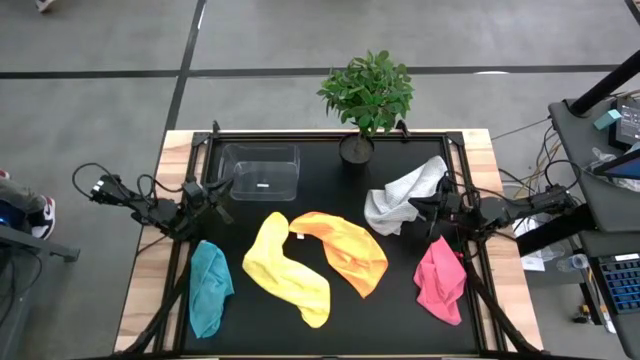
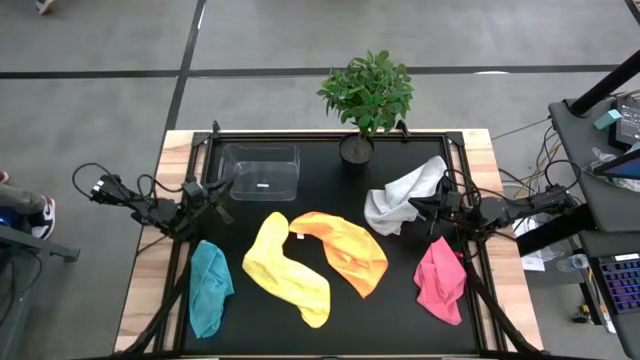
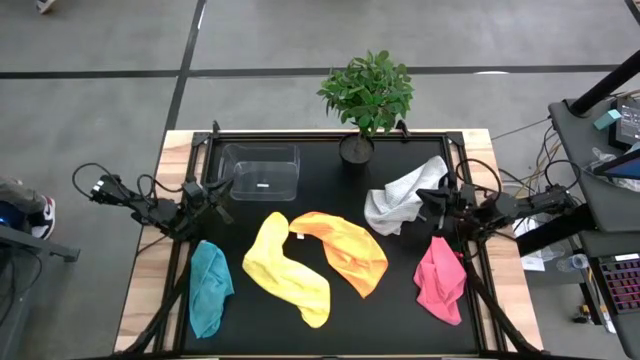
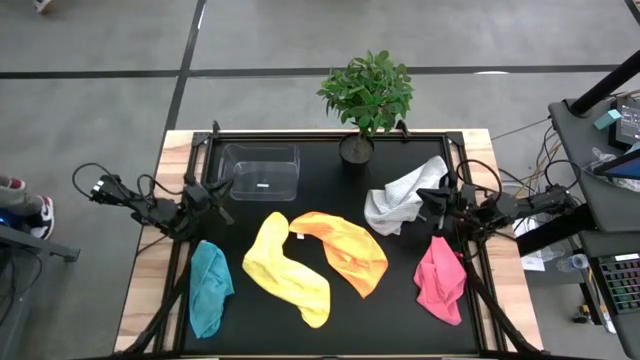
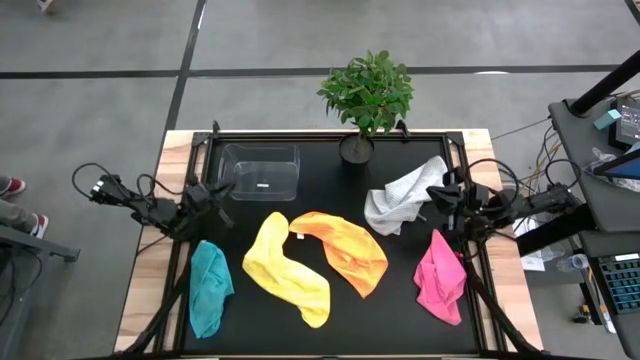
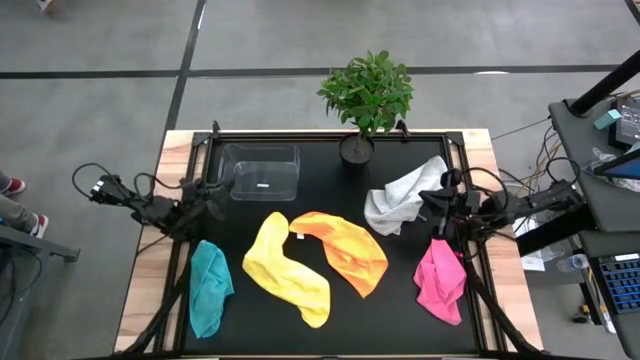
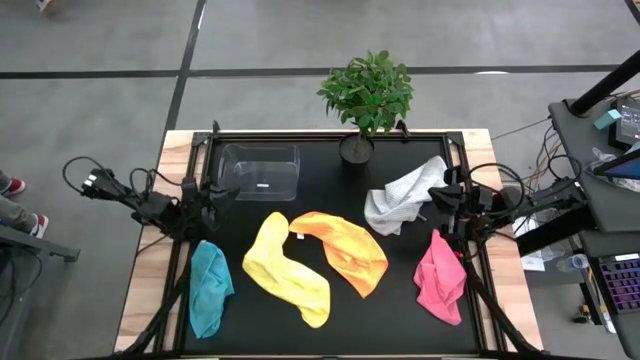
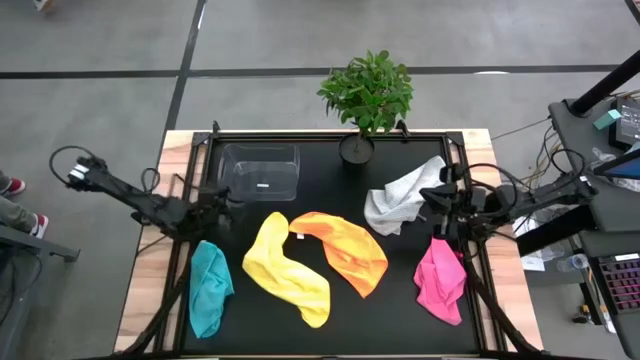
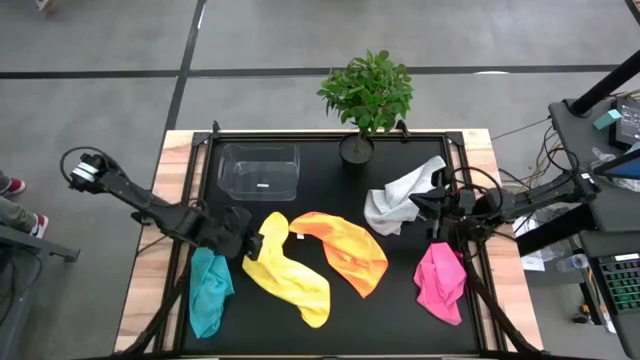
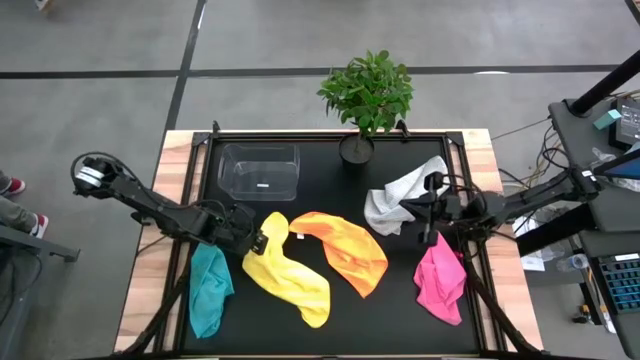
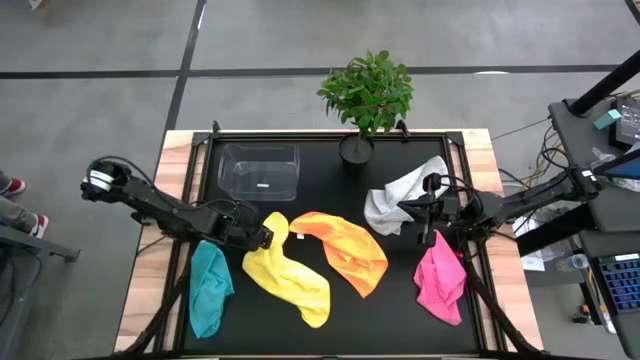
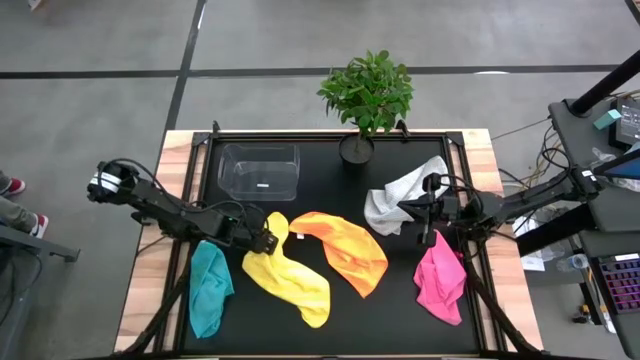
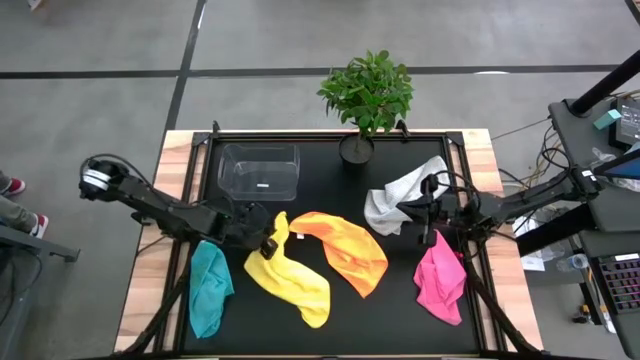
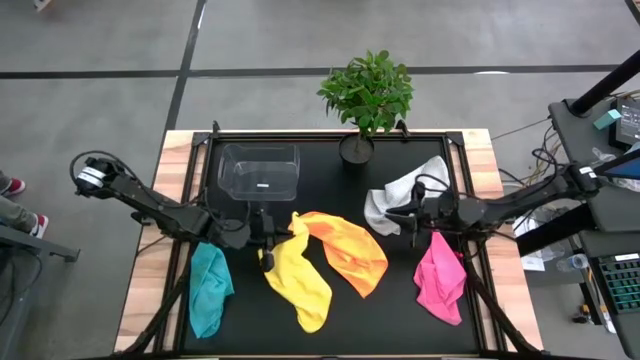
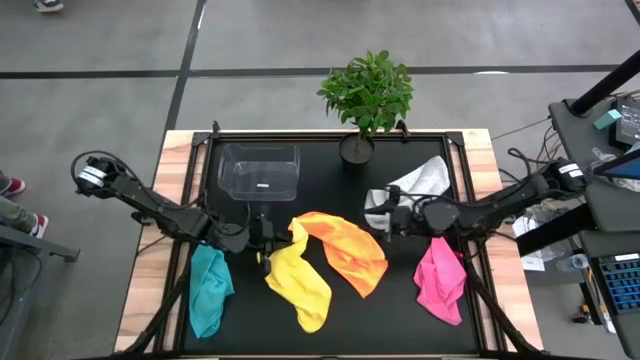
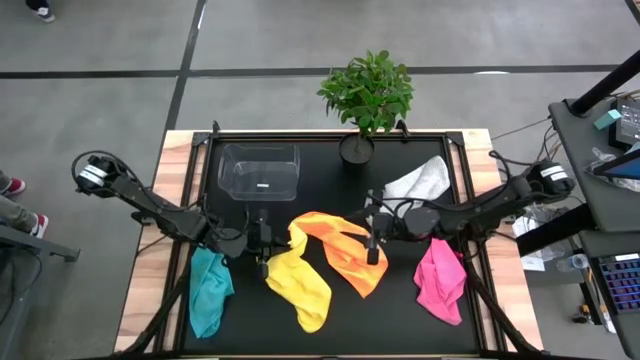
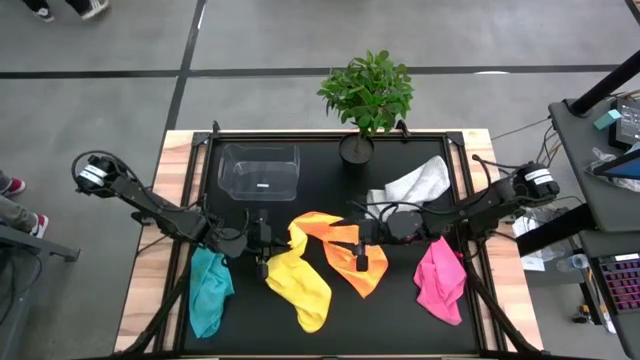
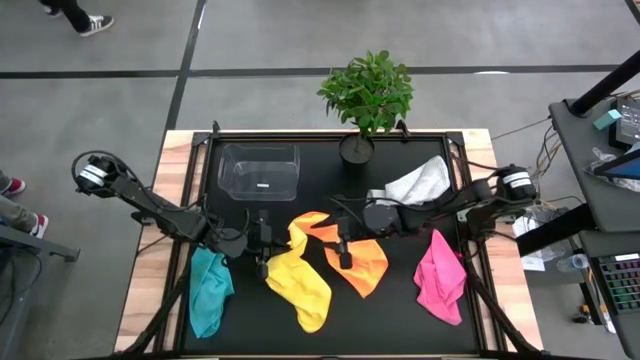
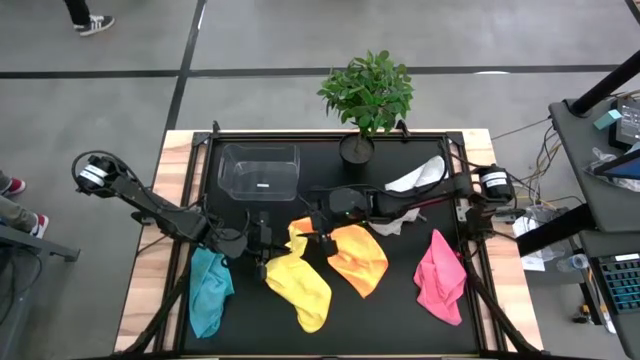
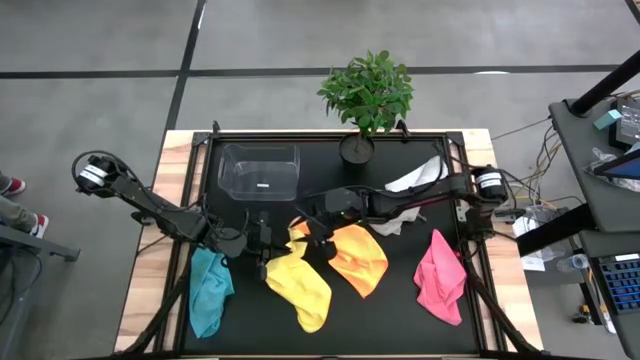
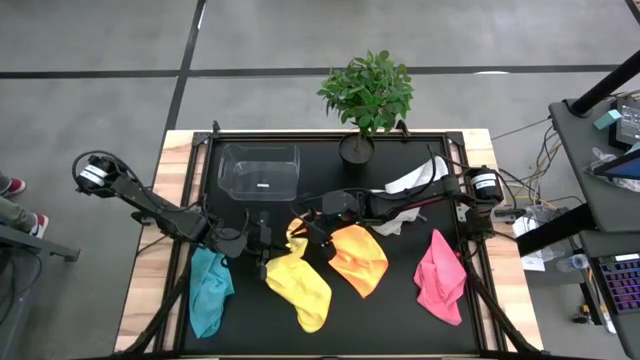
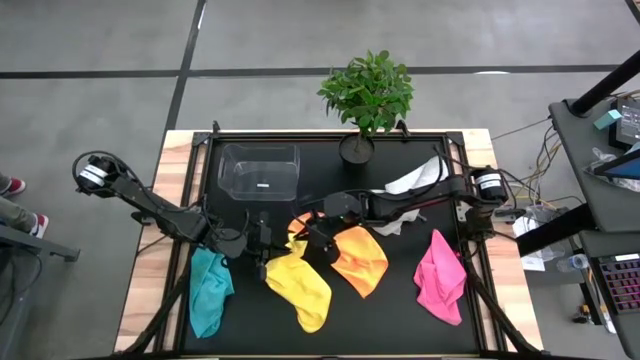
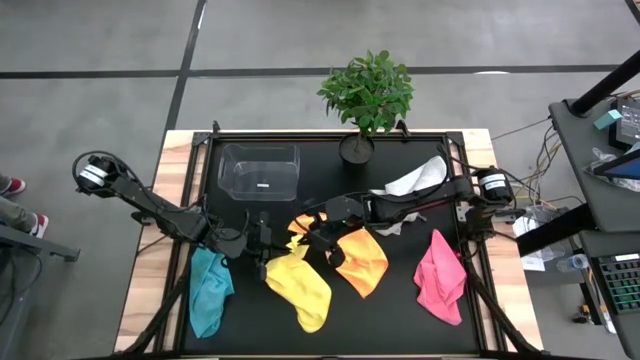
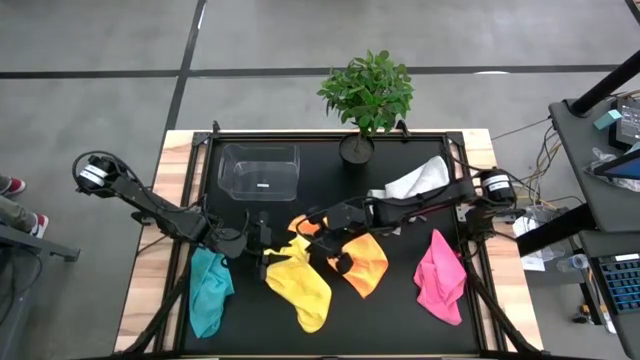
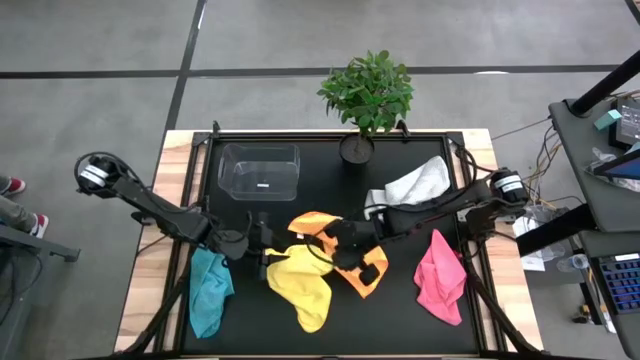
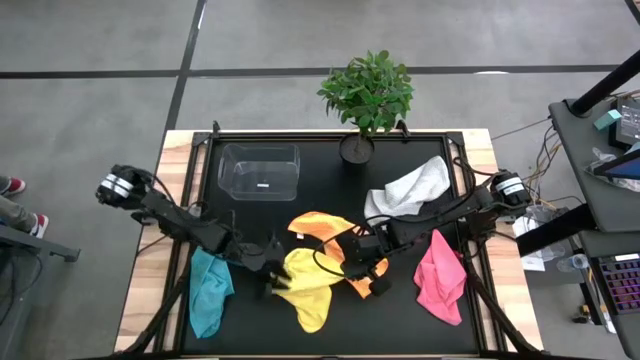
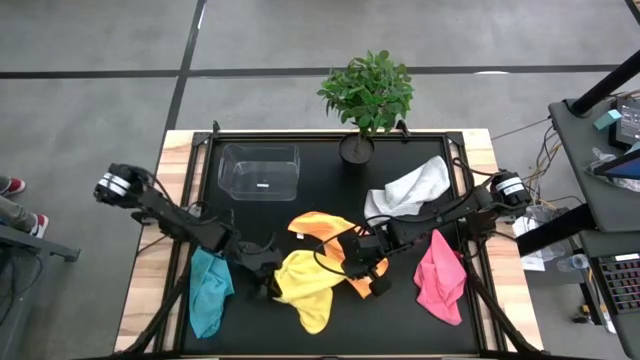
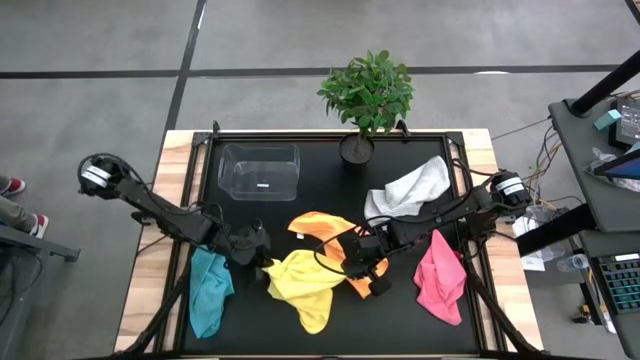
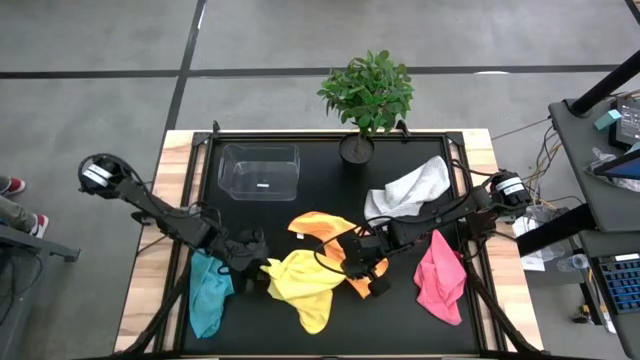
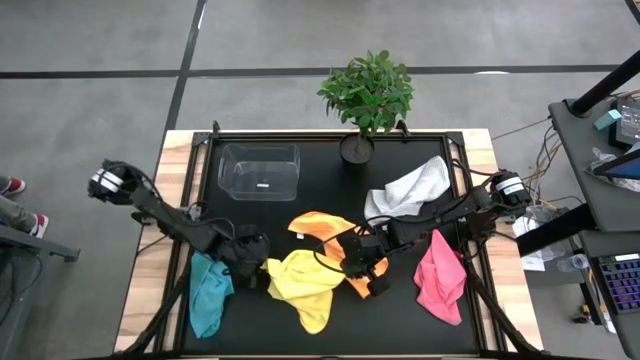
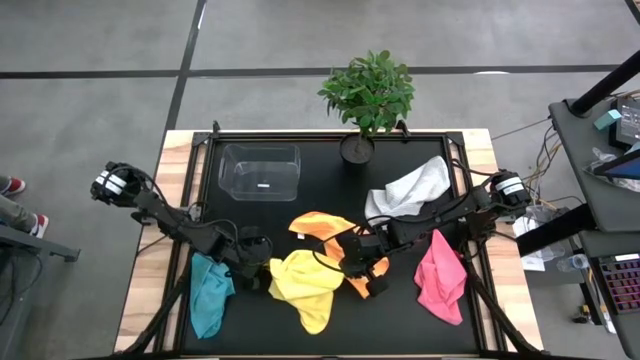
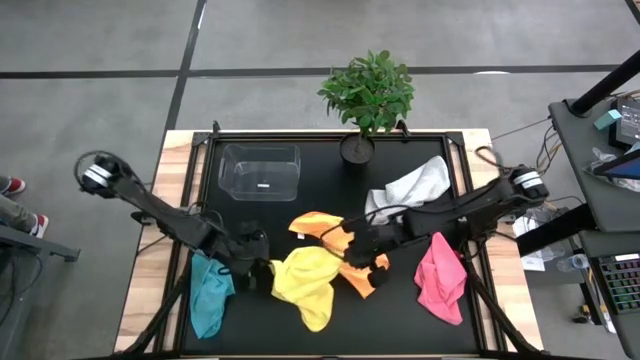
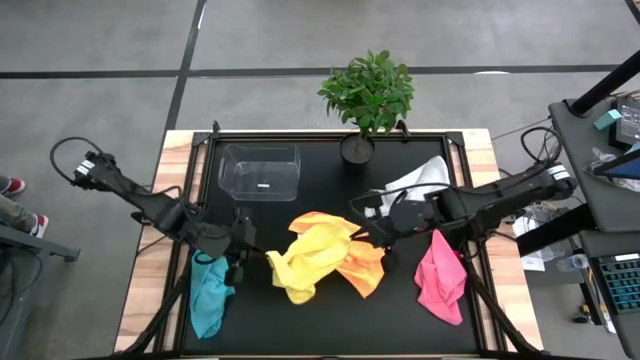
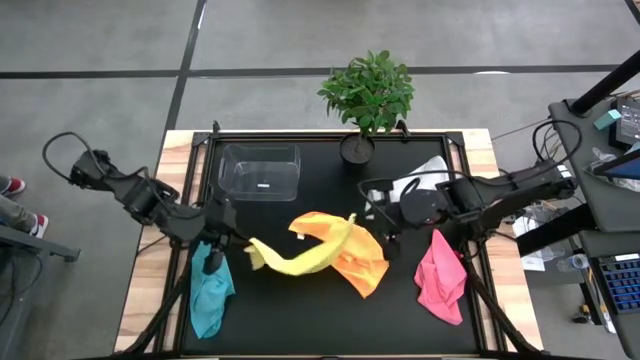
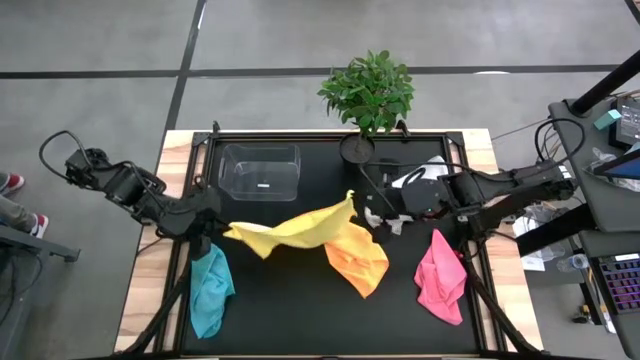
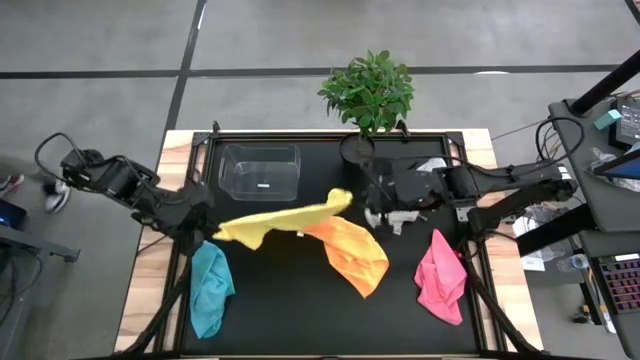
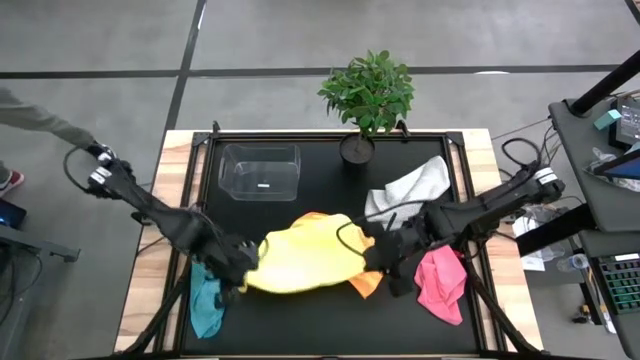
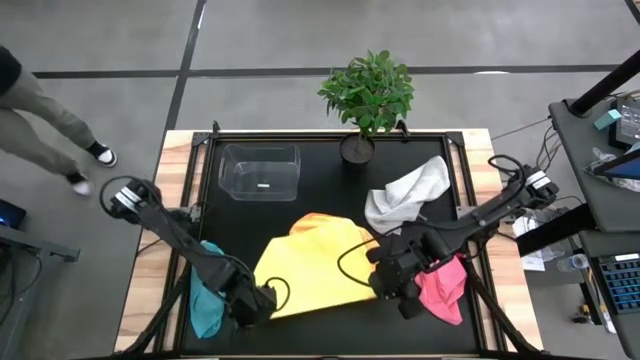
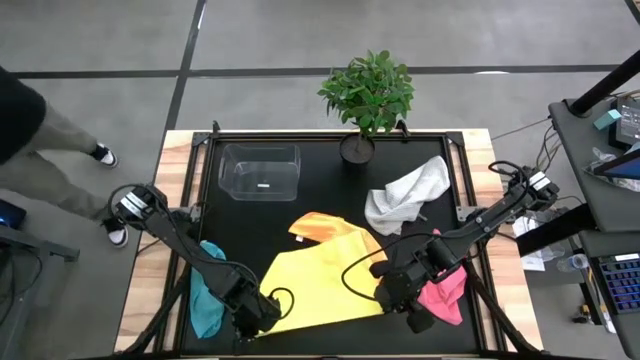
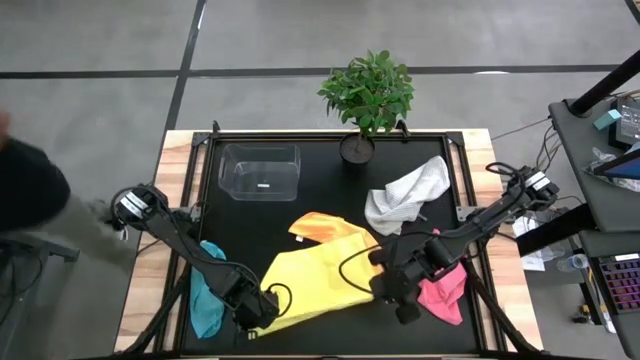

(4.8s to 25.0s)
Task: Fold microfiber towels
Fold the yellow towel
